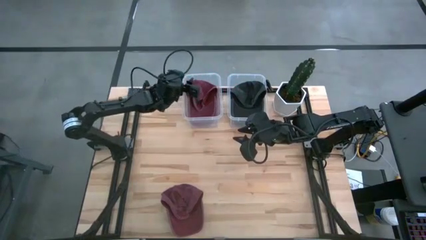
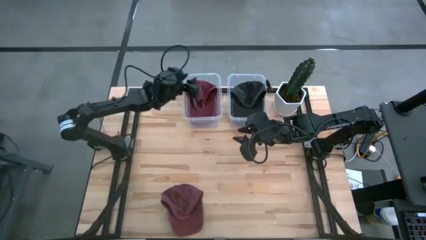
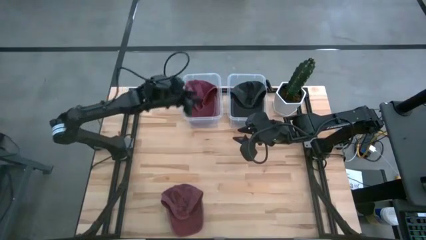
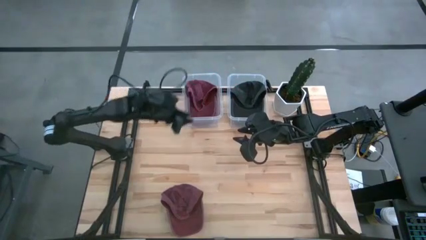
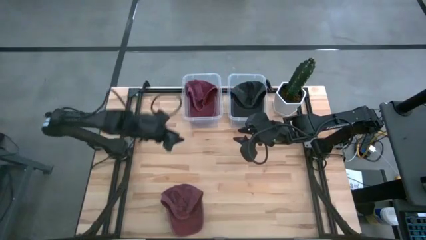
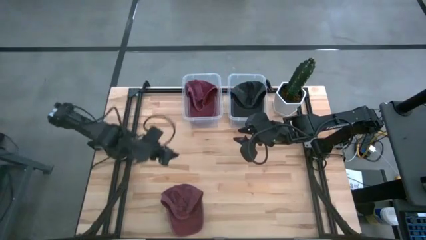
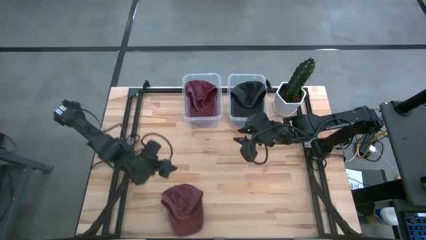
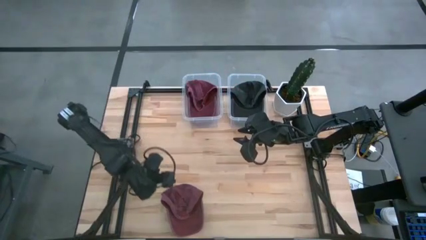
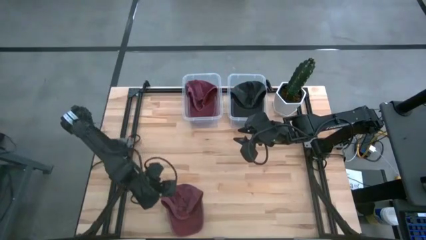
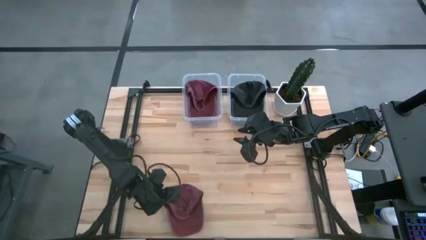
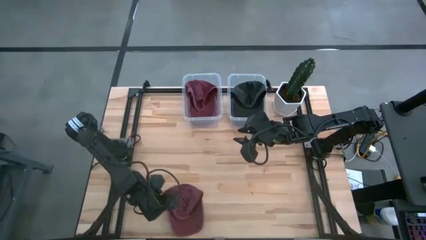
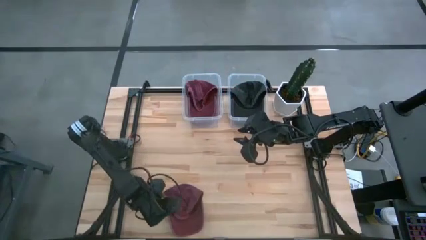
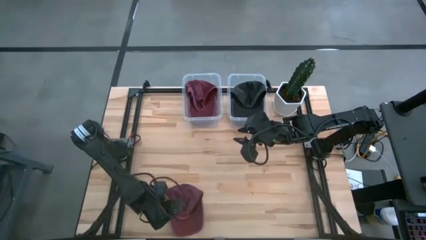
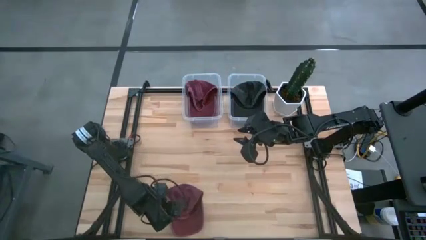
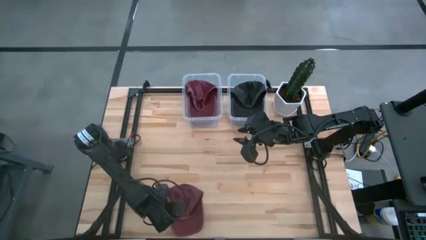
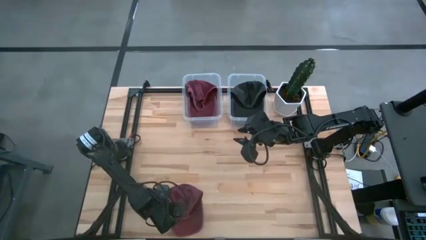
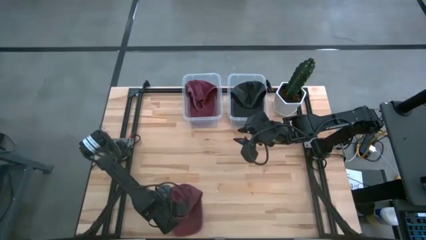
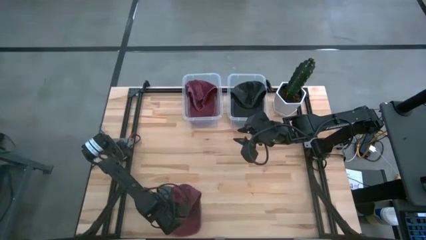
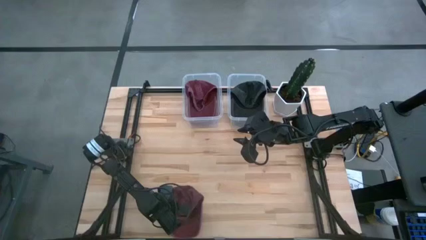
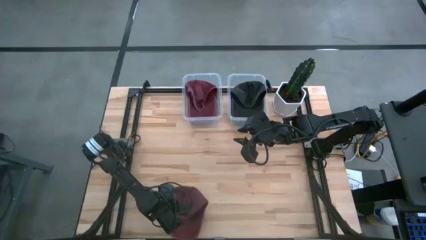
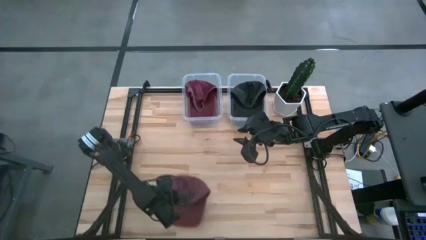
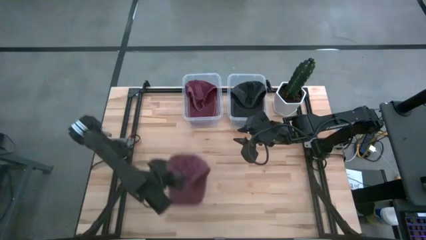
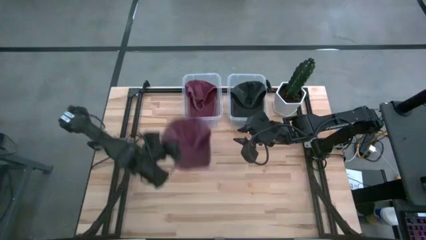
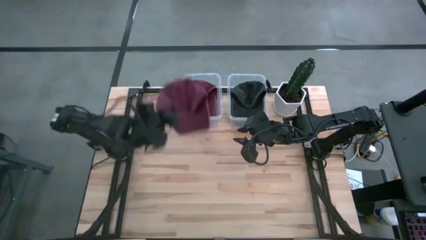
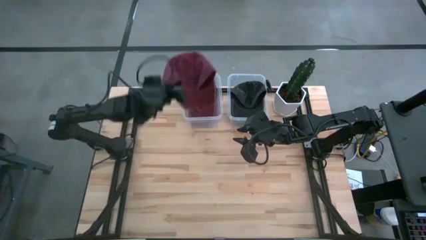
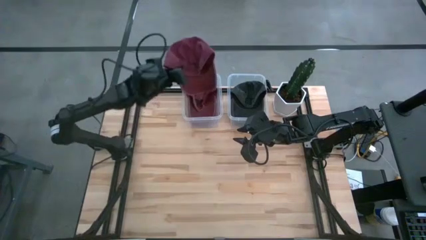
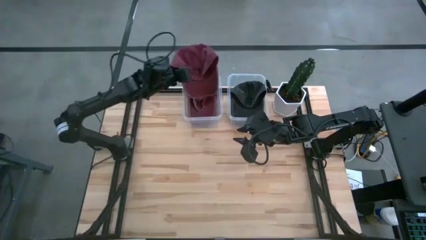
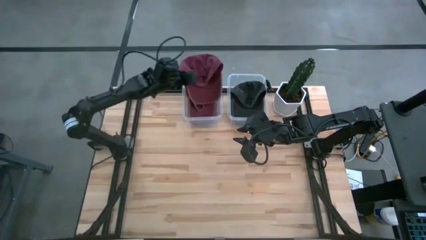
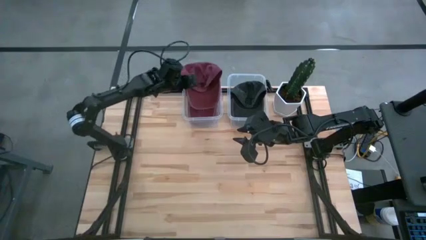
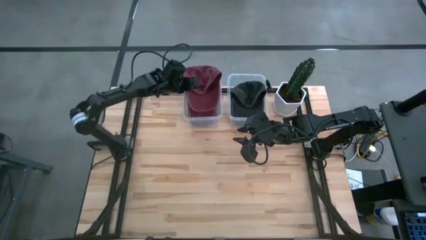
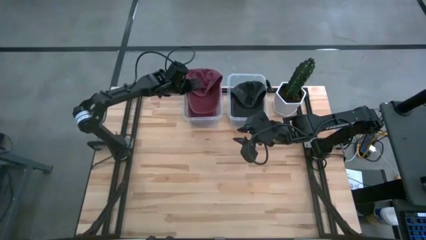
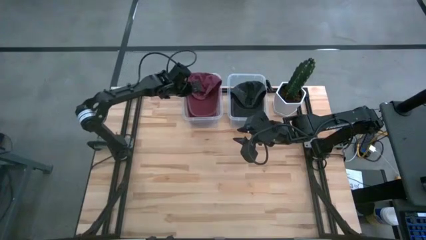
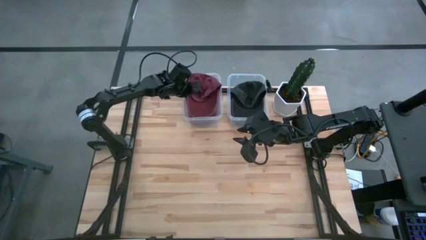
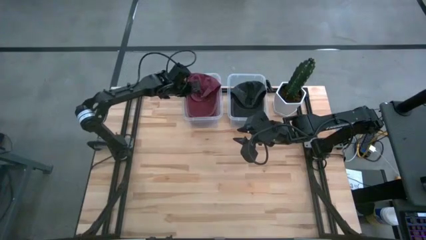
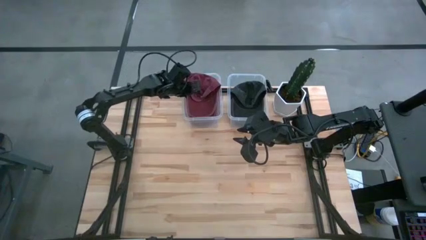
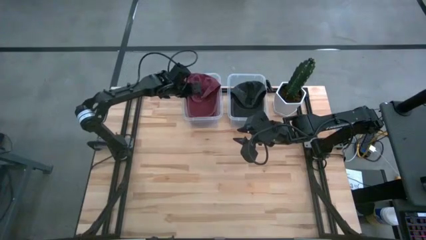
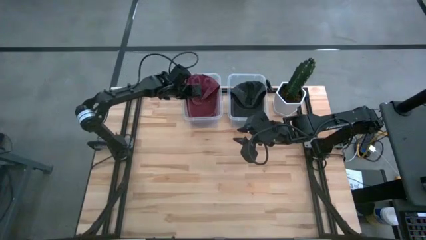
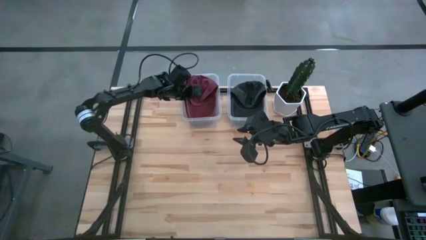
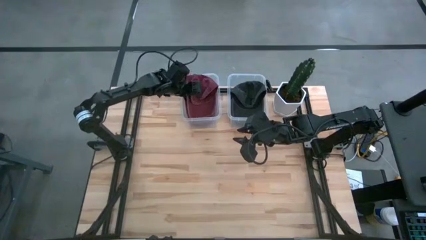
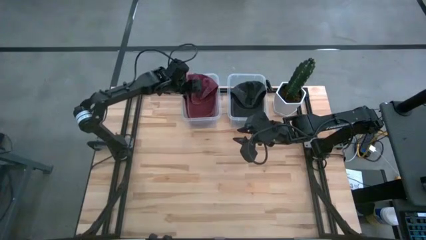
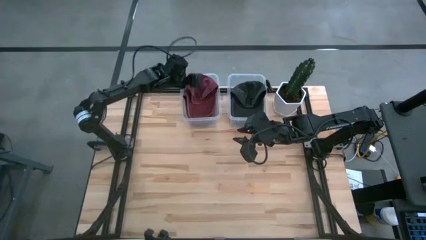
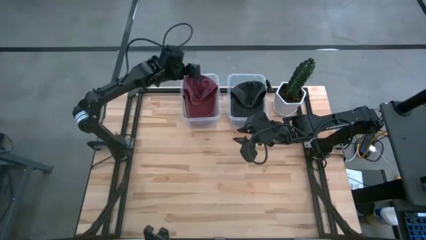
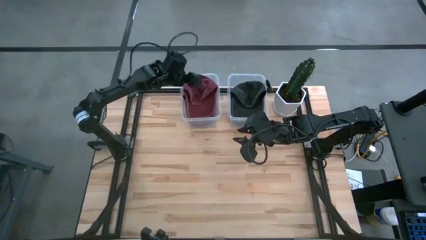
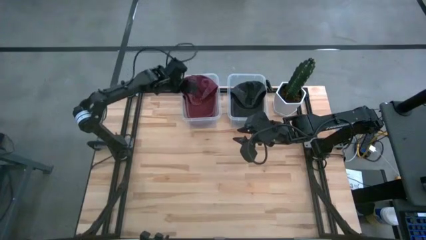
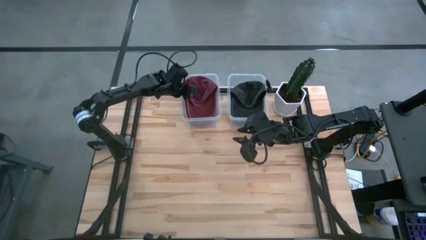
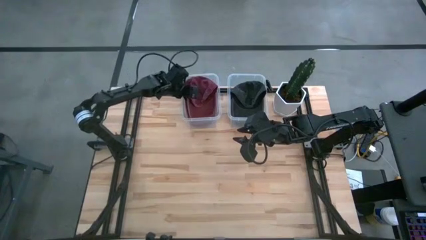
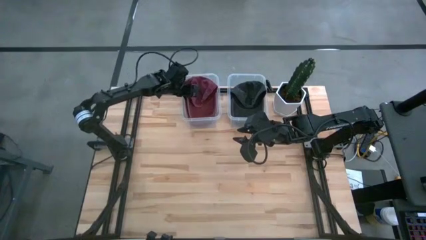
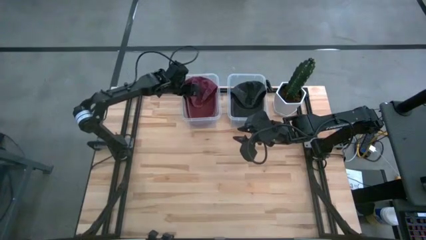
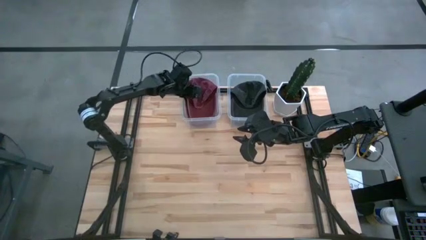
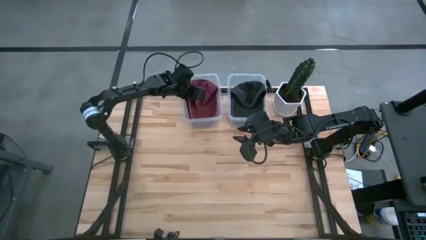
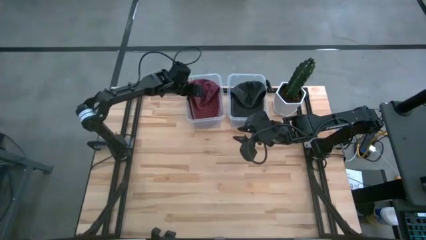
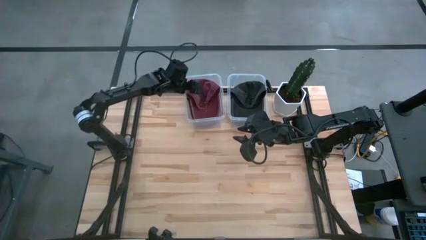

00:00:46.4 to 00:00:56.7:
Task: Pick & Place hat
Put the red cap into the left transparent bin
